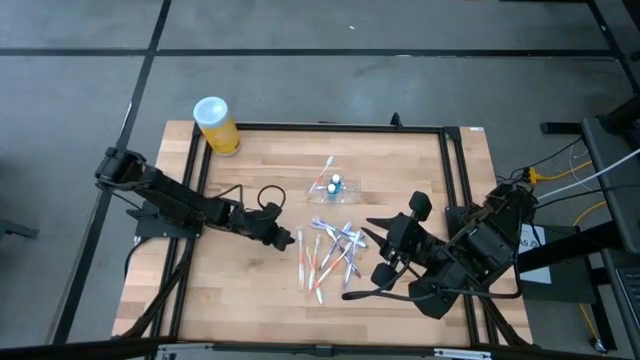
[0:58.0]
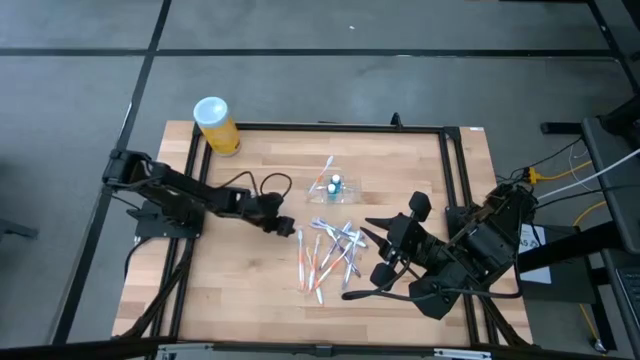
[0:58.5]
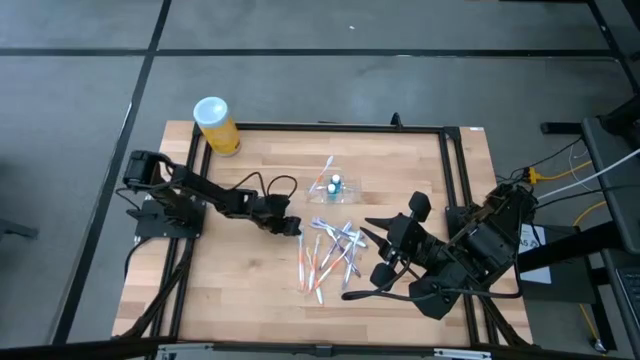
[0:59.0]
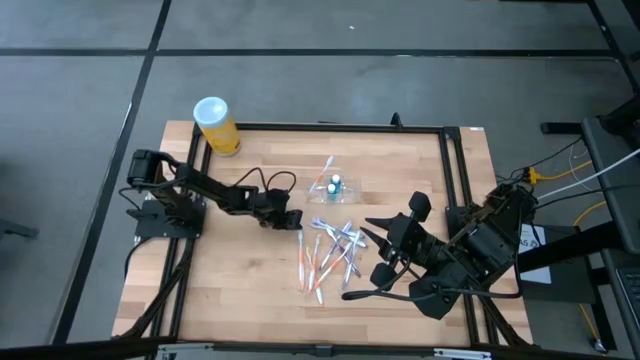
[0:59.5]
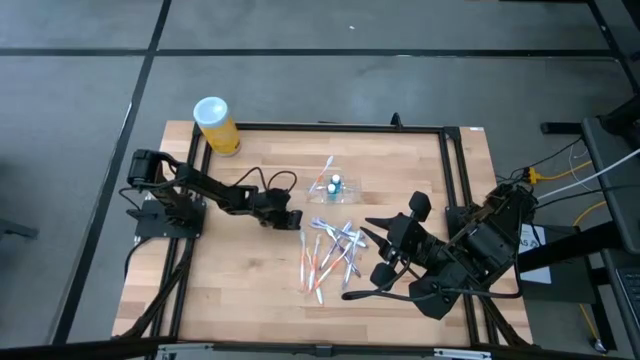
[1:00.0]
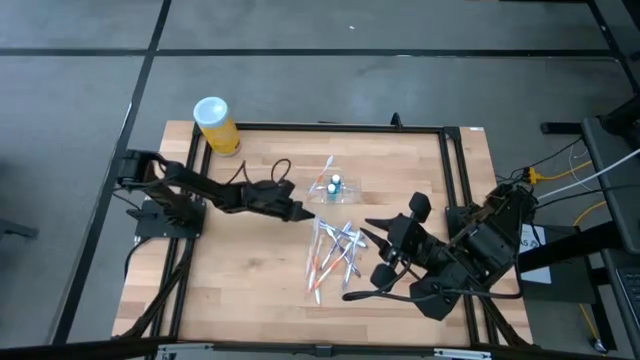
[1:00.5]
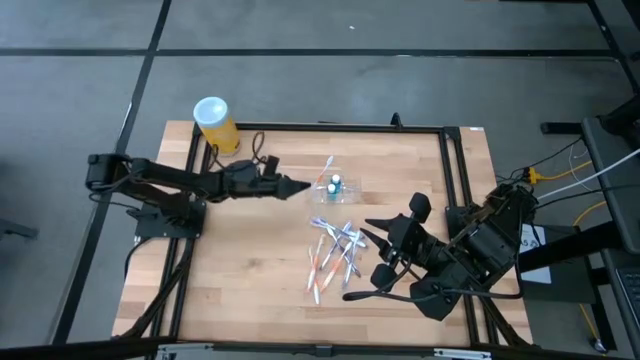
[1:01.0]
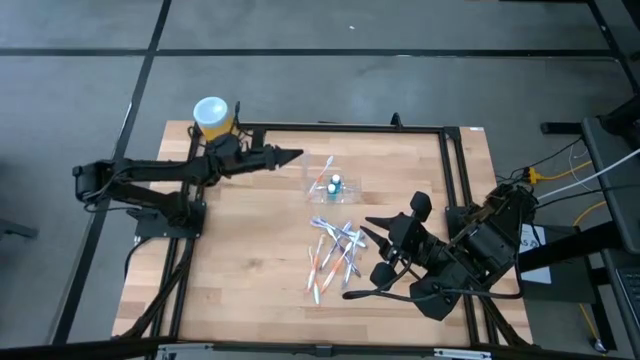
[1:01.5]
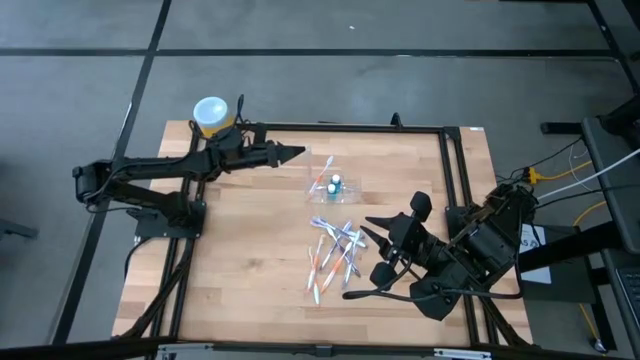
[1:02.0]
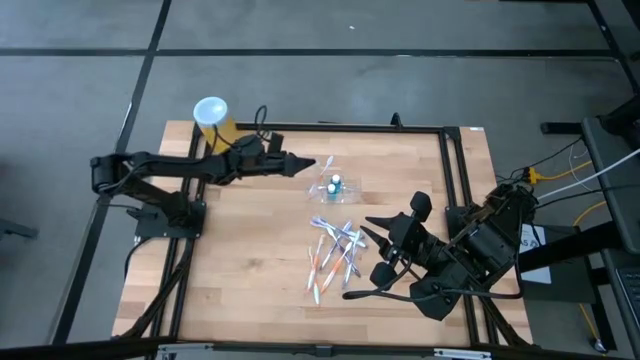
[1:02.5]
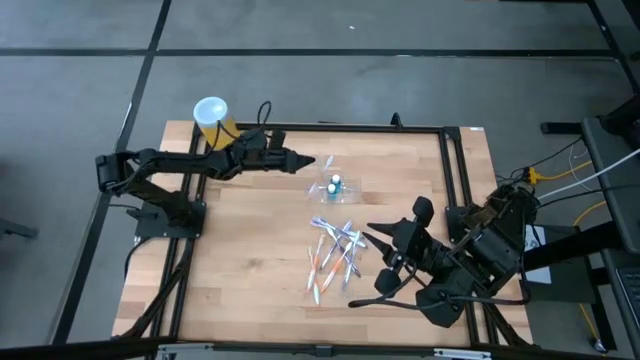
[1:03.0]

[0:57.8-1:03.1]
Task: Pick & Place toothbrushing station
Put the orange toothbrush into the transparent organizer

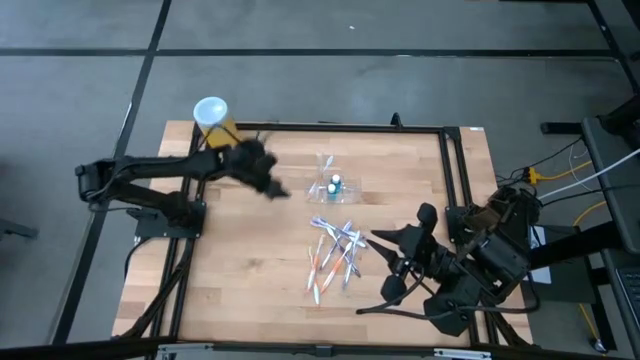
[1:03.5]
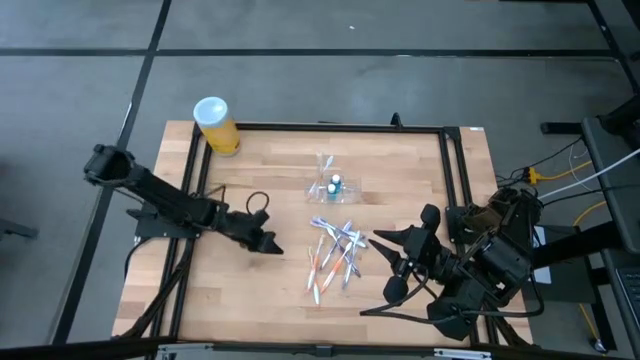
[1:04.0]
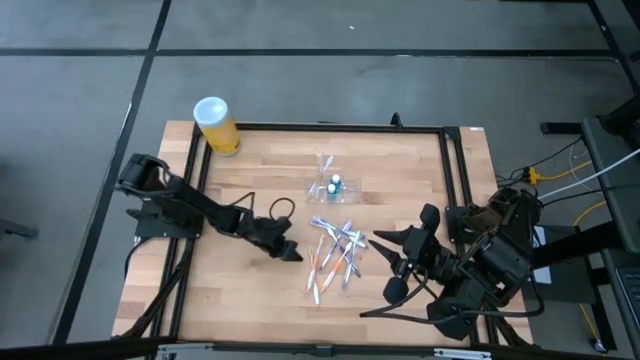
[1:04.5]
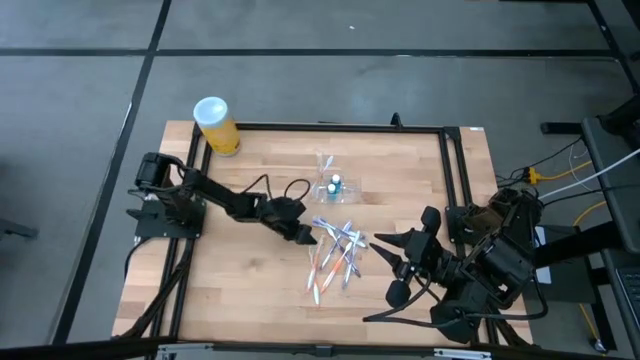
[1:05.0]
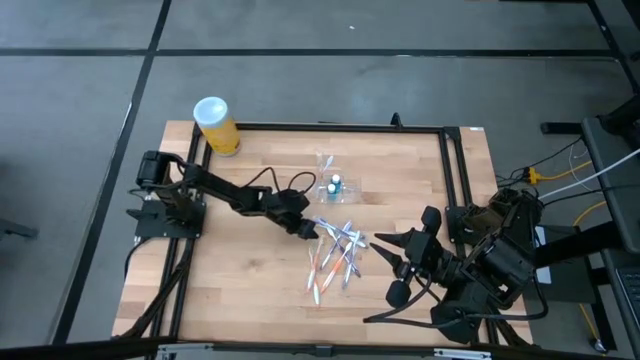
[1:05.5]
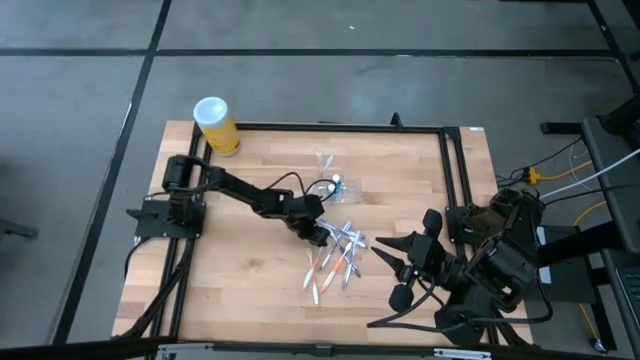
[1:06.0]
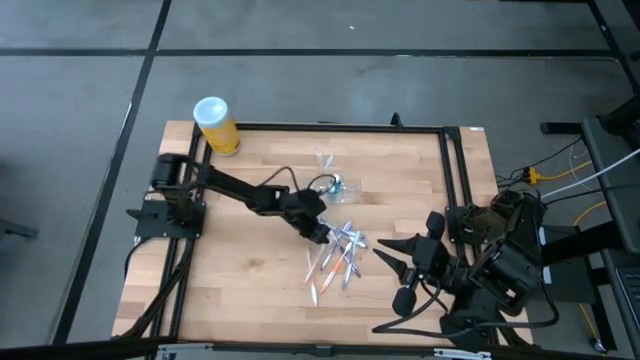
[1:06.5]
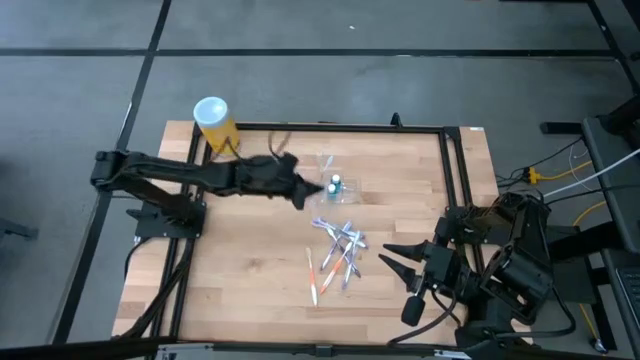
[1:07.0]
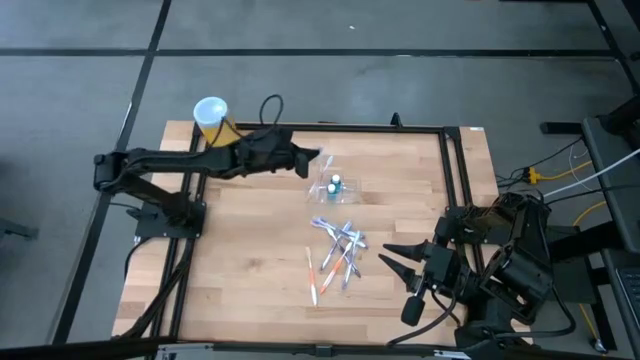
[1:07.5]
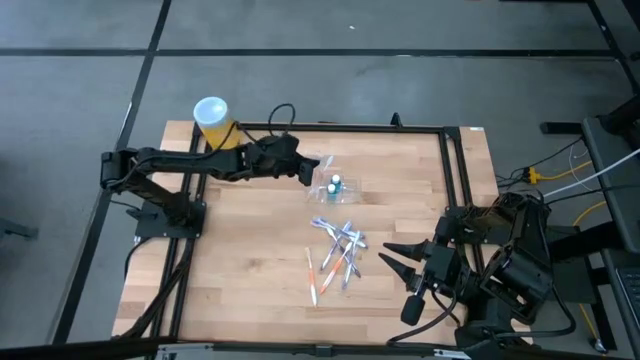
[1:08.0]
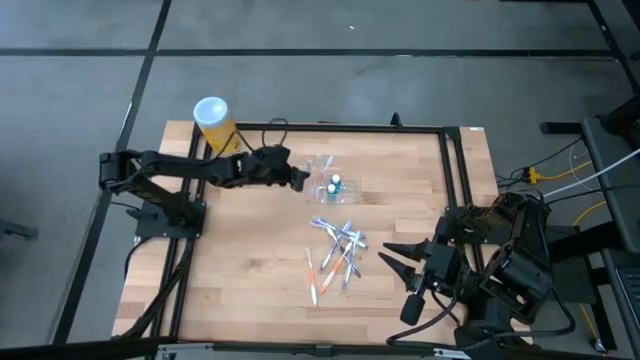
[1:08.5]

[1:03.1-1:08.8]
Put the orange toothbrush into the transparent organizer

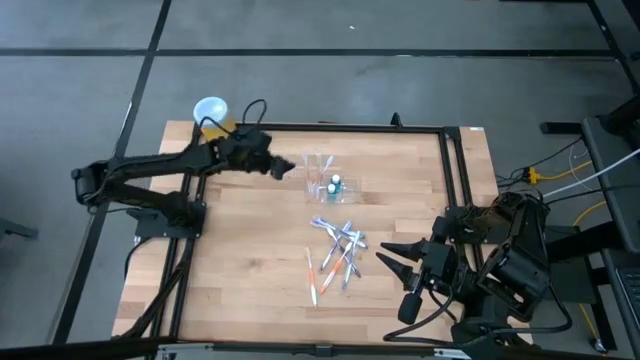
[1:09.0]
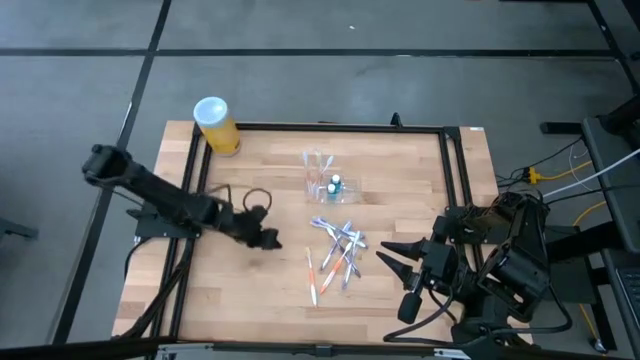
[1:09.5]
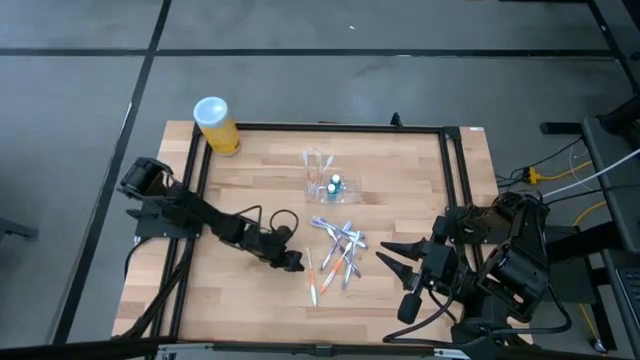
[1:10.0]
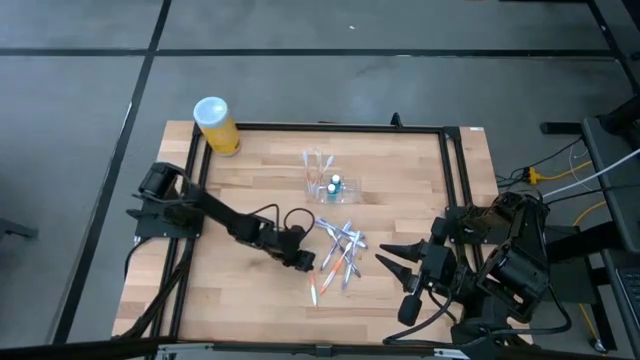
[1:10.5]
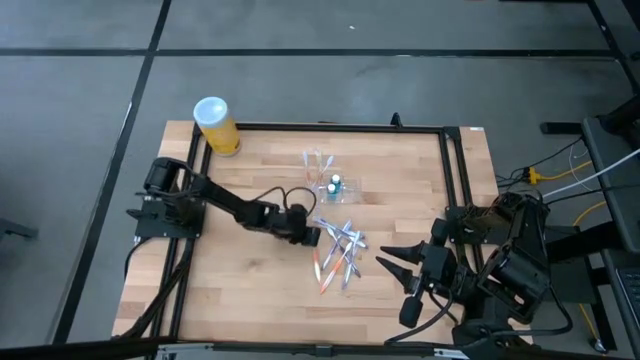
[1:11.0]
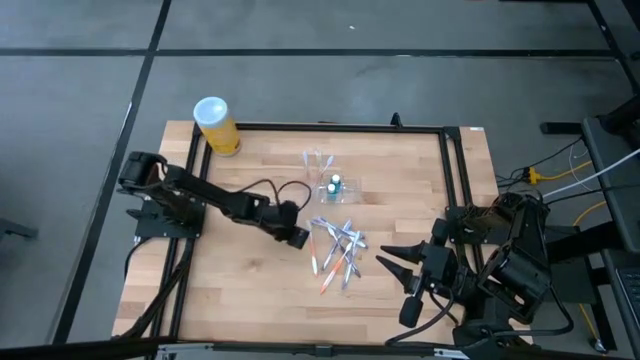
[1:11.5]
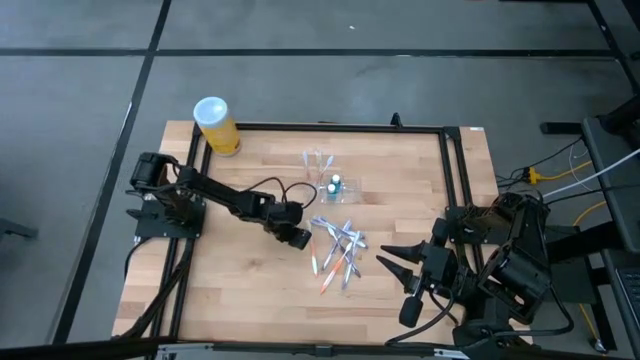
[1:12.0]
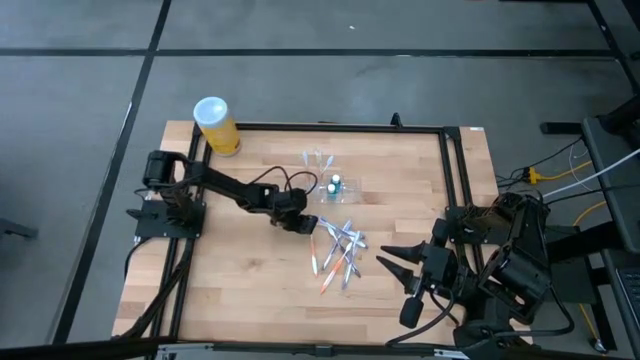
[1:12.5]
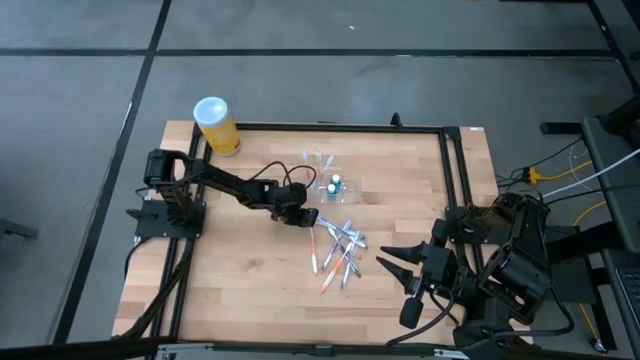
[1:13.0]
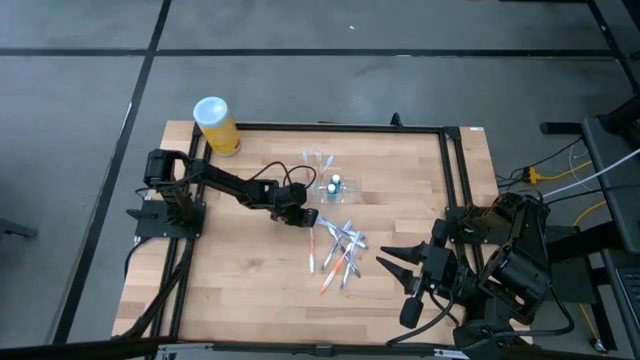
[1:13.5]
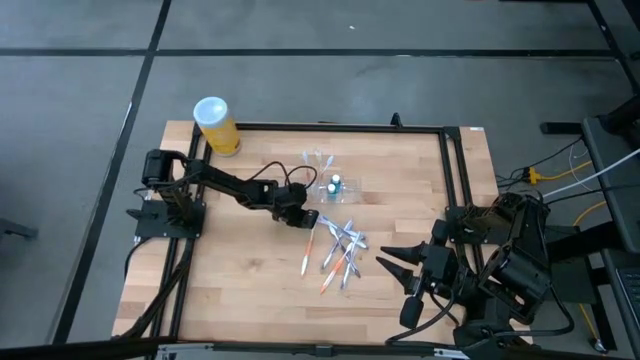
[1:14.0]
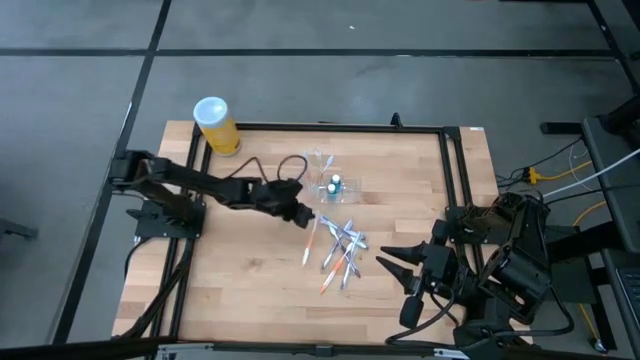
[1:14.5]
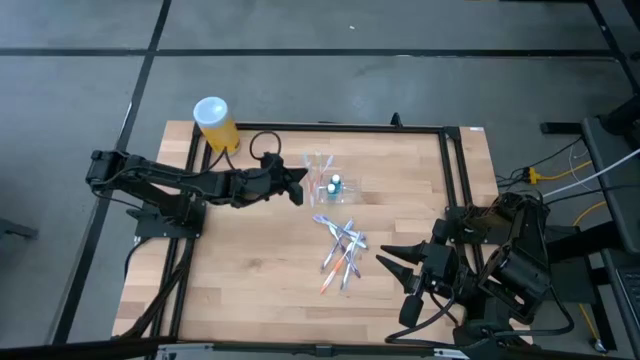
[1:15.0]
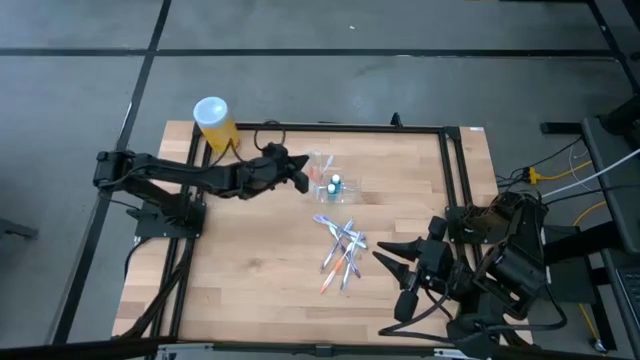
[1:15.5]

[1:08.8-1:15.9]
Put the orange toothbrush into the transparent organizer

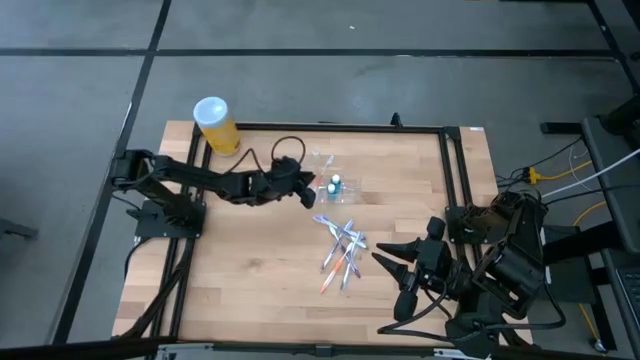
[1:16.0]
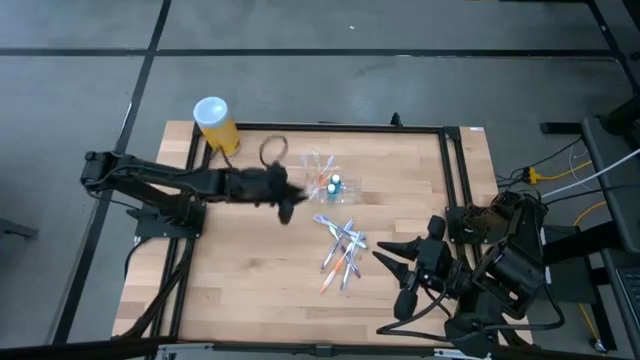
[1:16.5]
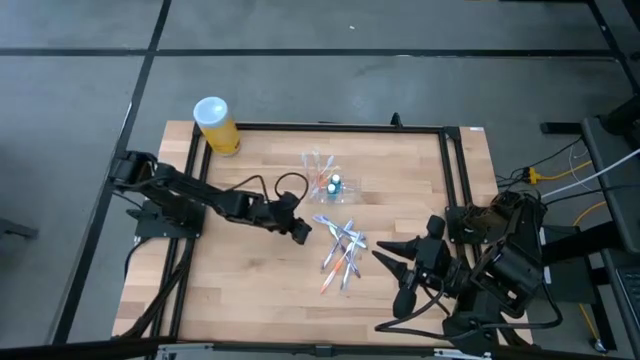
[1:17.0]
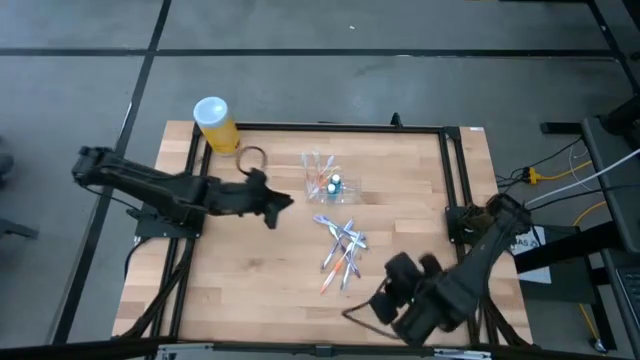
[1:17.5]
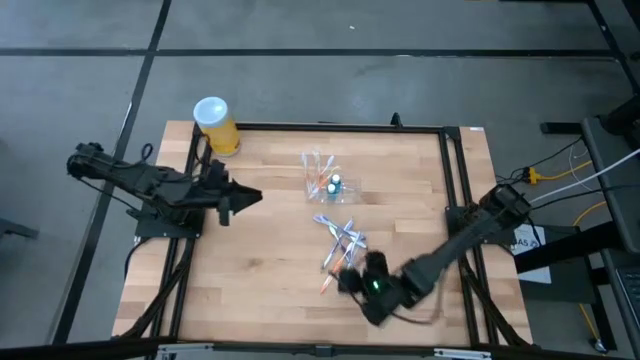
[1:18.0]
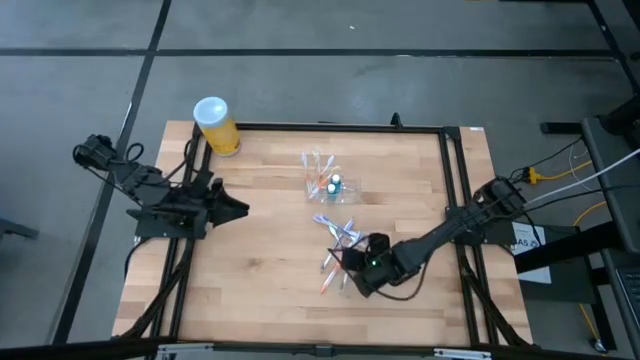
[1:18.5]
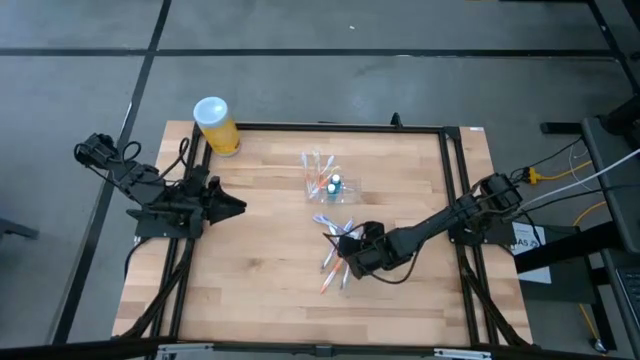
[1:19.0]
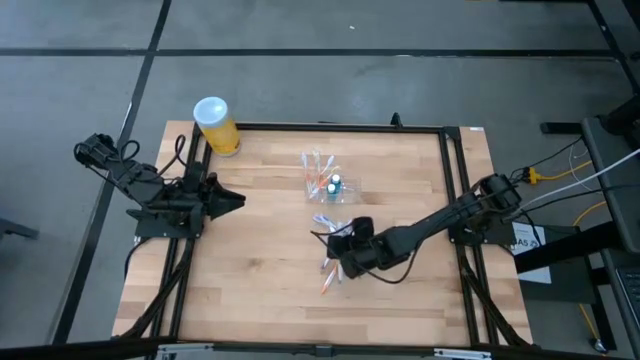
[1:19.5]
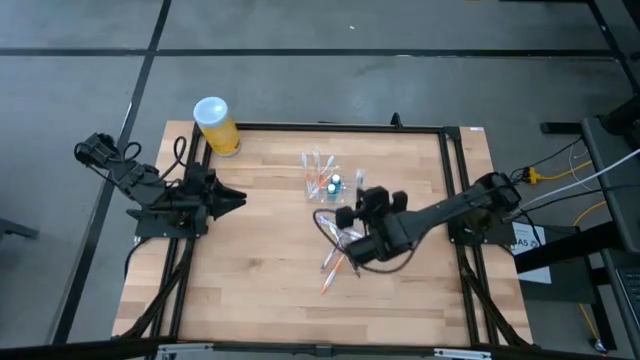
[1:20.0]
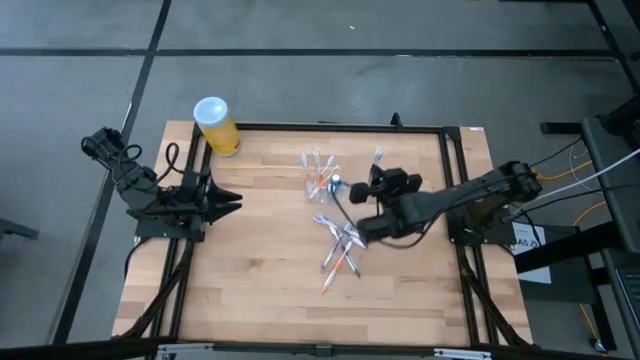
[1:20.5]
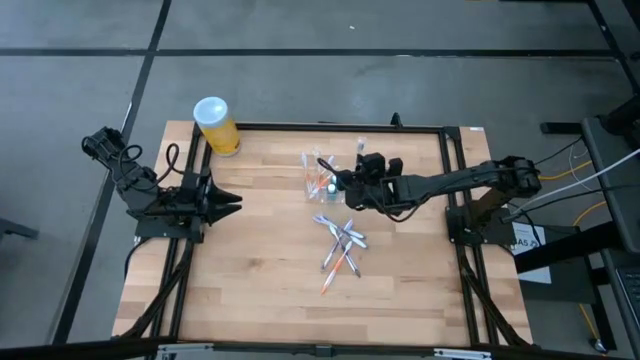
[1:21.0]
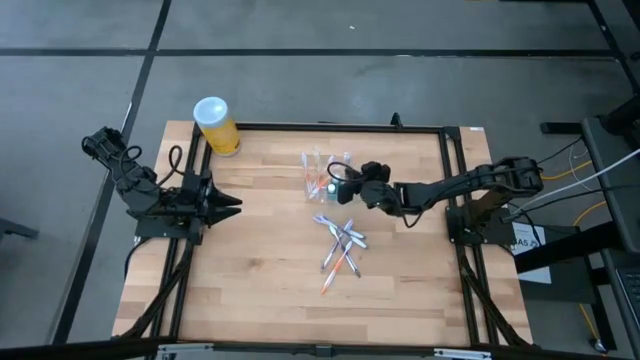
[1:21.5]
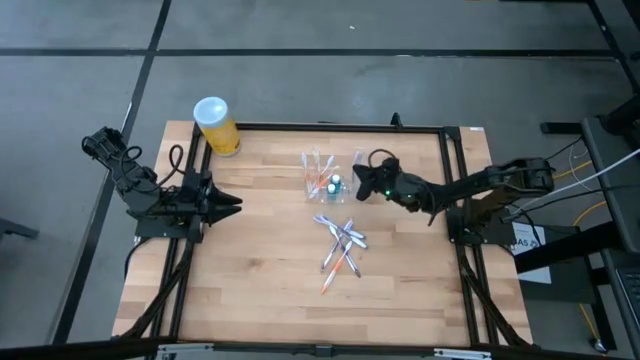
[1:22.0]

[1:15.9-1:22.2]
Put the violet toothbrush into the transparent organizer
